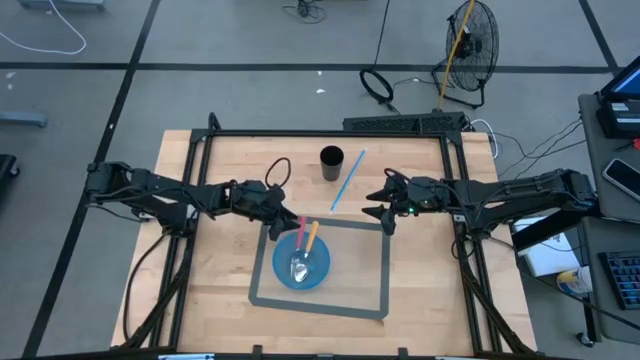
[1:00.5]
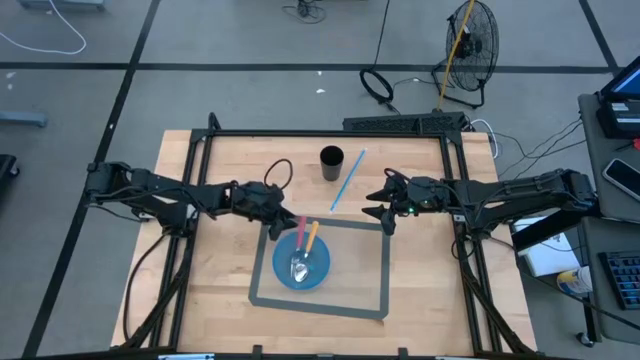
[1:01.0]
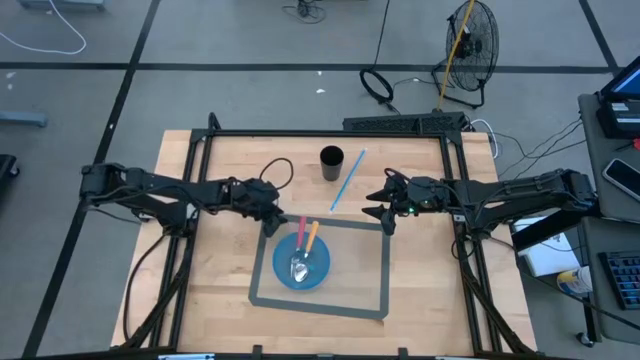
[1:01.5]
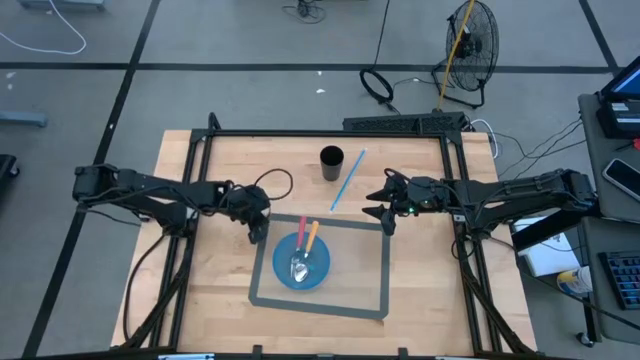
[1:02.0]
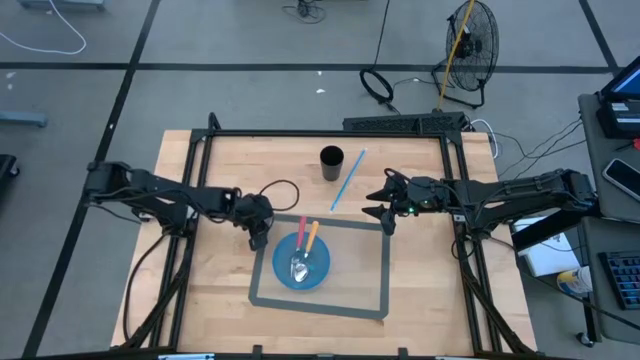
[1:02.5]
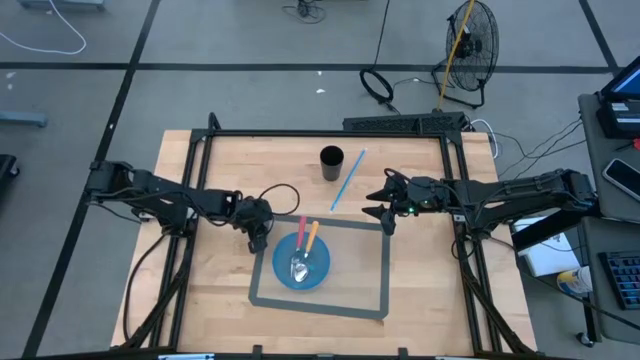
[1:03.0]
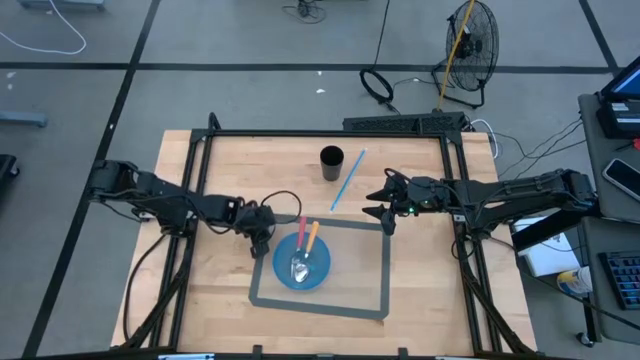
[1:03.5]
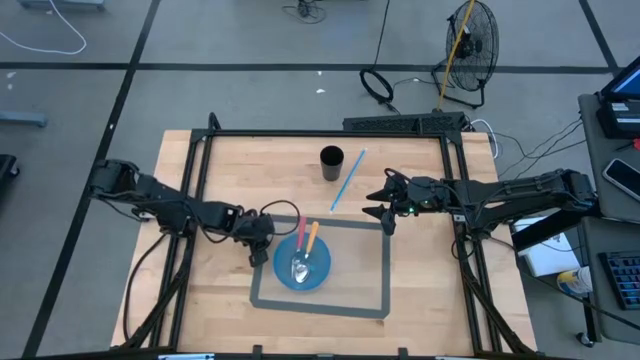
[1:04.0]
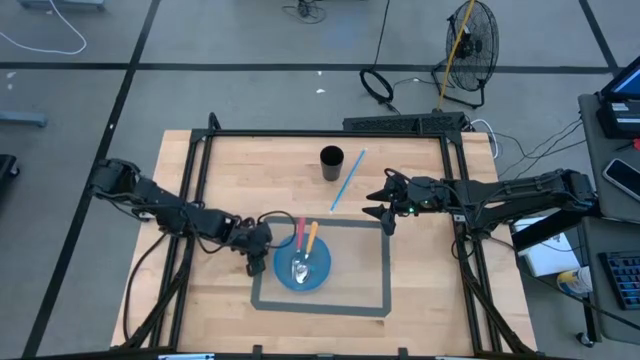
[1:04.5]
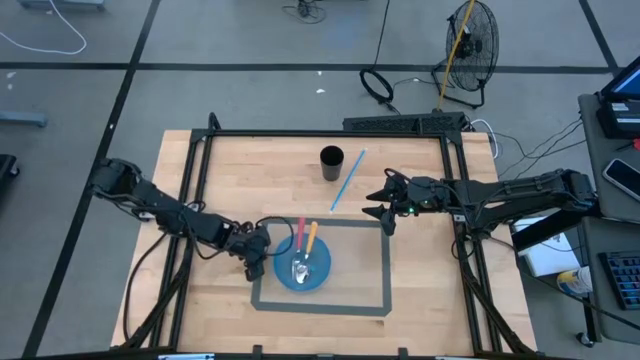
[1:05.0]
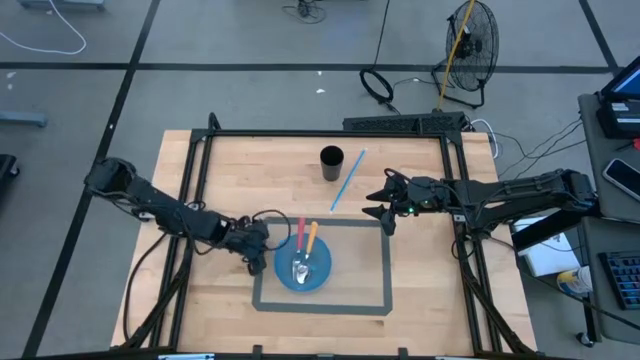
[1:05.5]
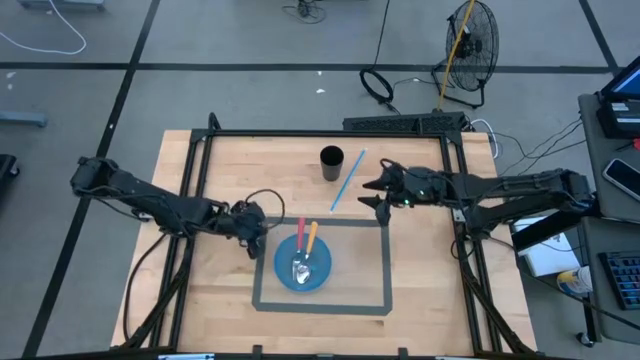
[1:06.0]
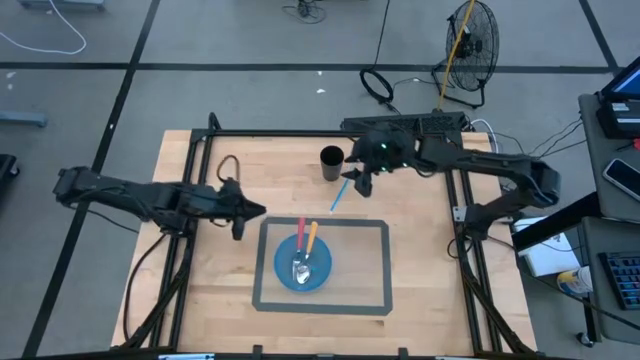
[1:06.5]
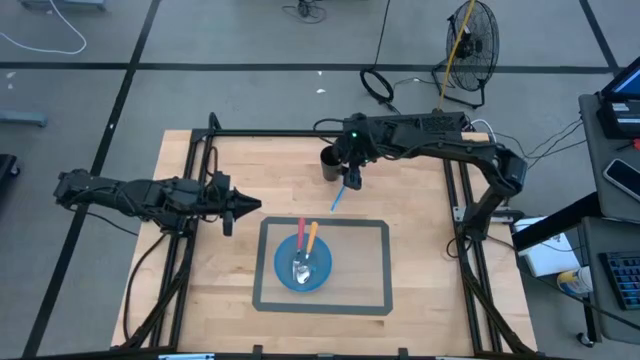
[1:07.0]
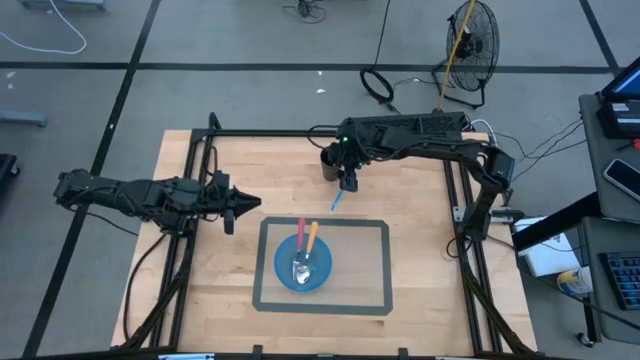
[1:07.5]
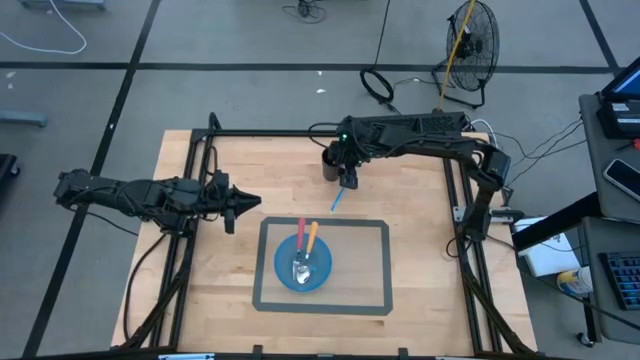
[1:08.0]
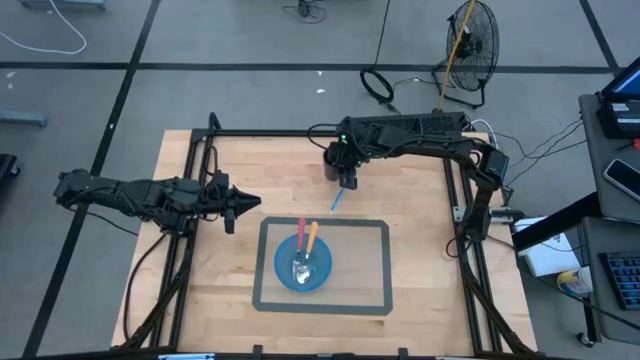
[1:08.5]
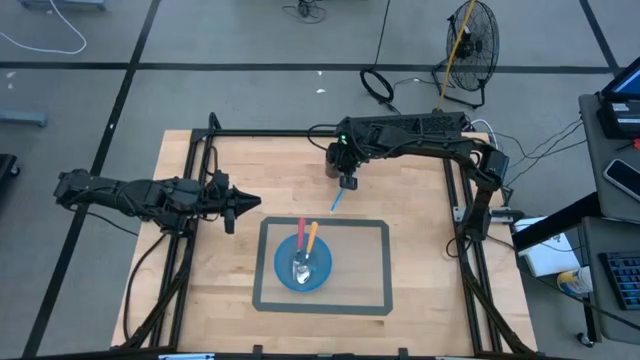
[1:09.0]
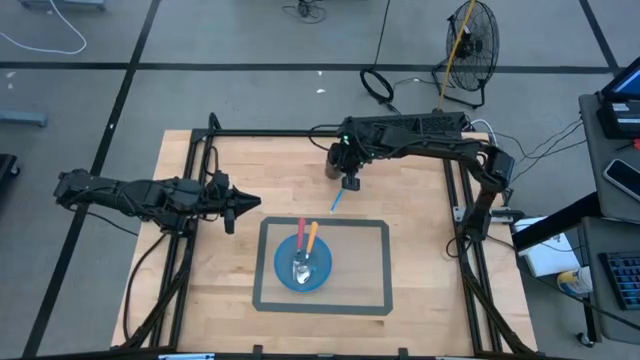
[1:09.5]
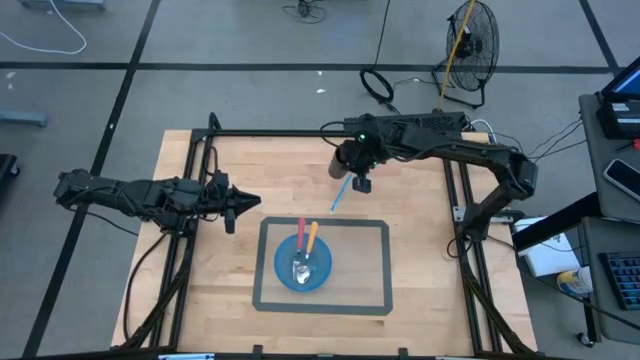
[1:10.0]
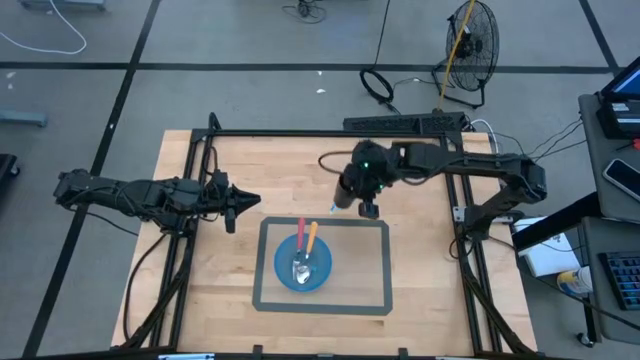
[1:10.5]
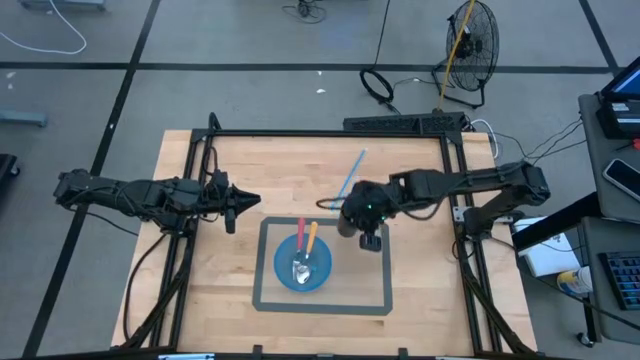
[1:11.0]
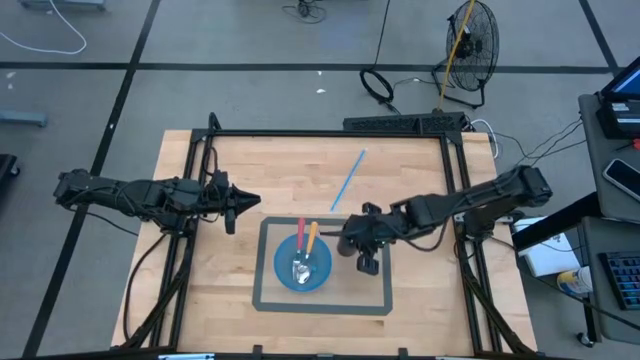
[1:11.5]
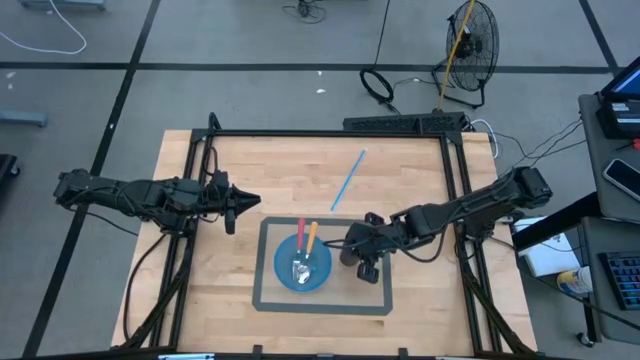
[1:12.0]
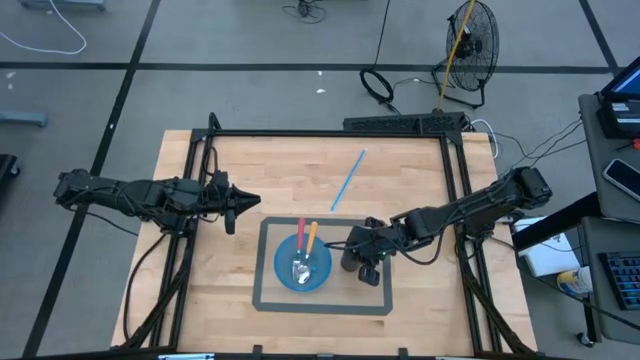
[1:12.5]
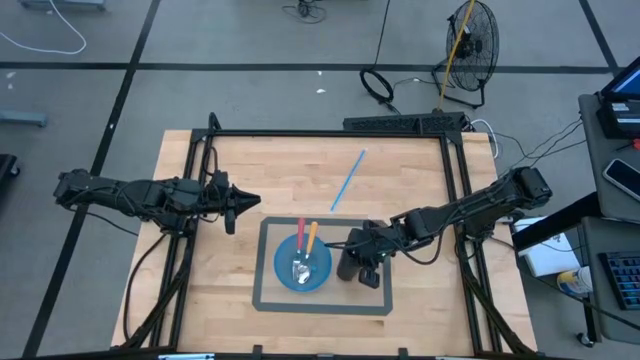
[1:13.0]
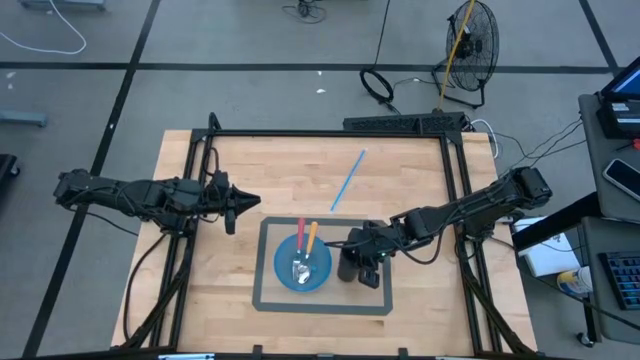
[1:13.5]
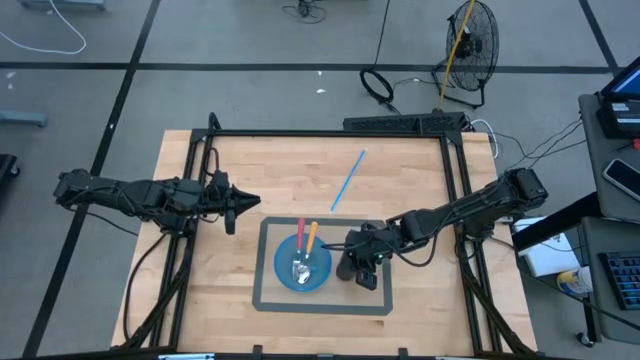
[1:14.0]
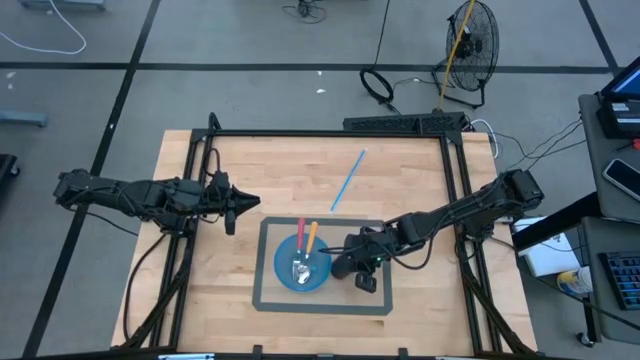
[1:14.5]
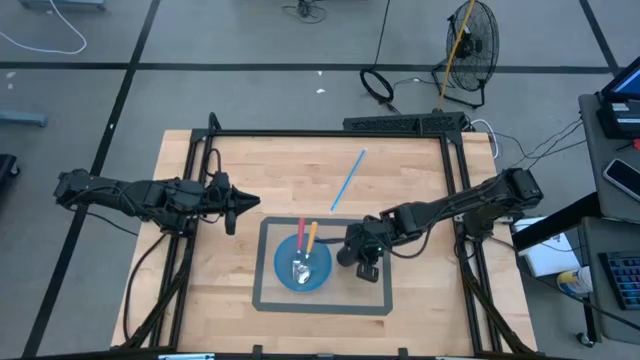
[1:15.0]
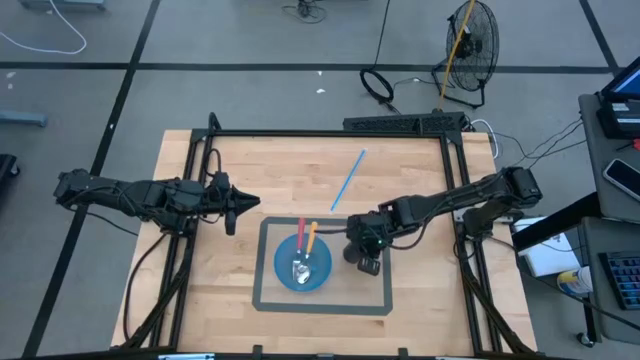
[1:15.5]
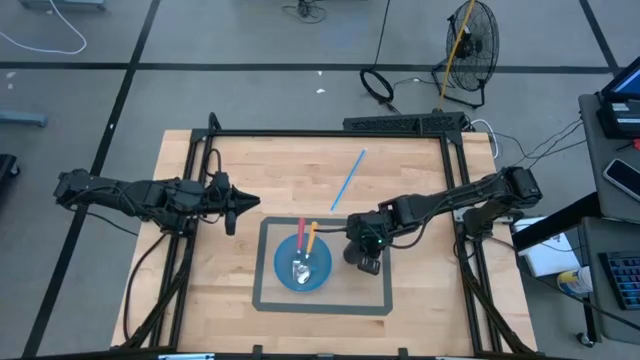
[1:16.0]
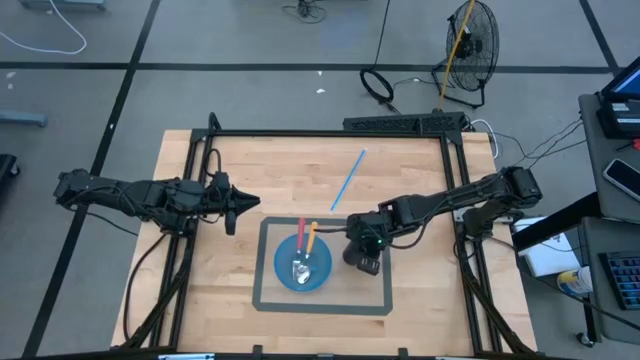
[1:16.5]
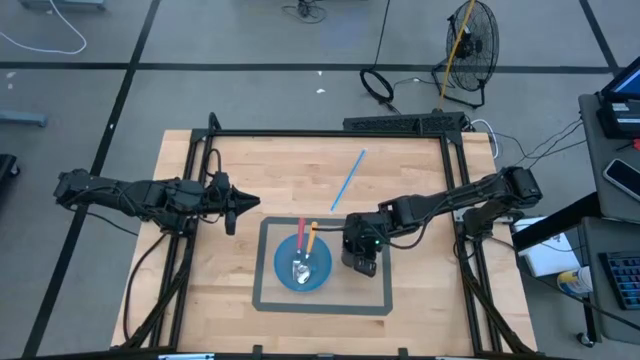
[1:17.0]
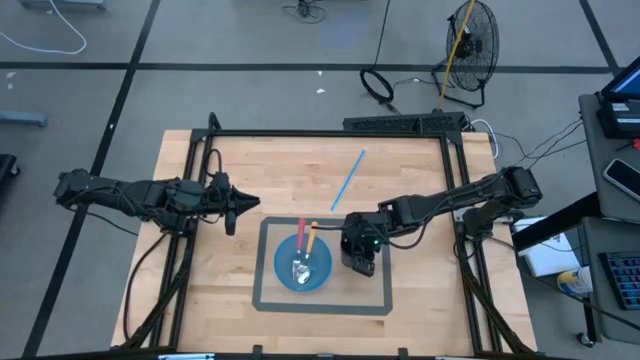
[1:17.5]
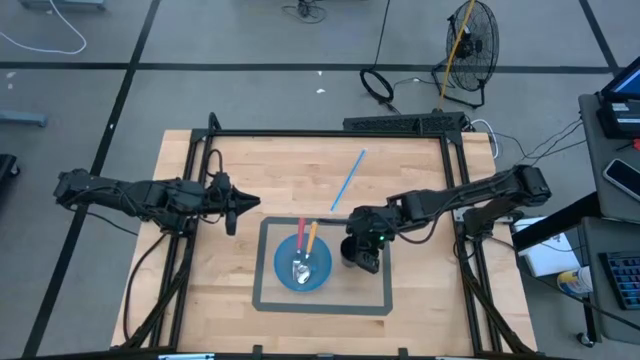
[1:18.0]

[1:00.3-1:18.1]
Task: Pick & Place Utensil
Put the black cup on the transparent mat to the right of the blue bowl

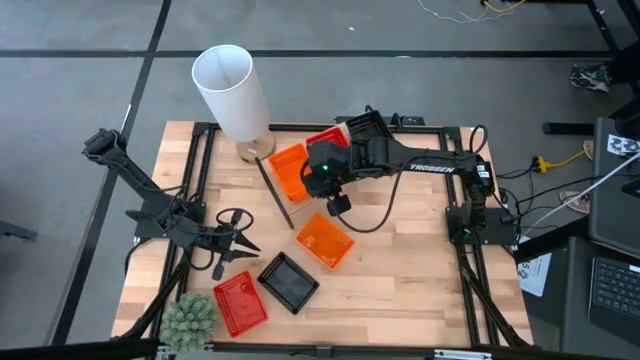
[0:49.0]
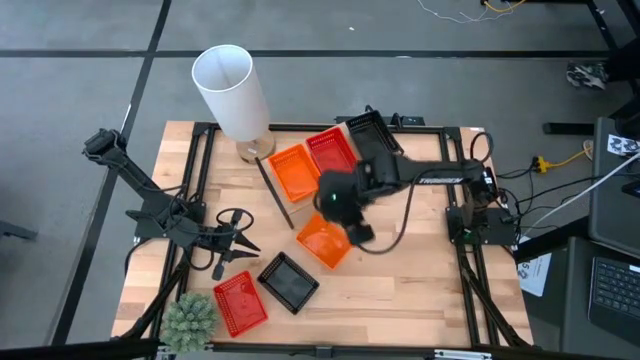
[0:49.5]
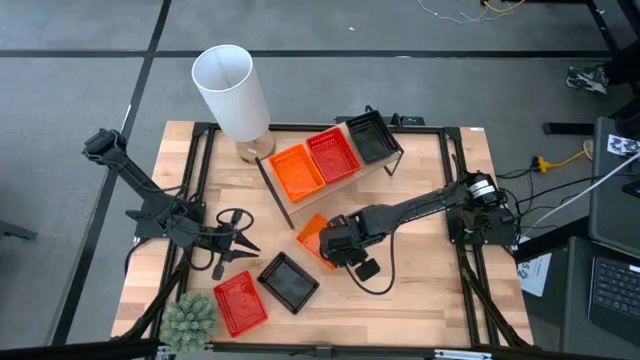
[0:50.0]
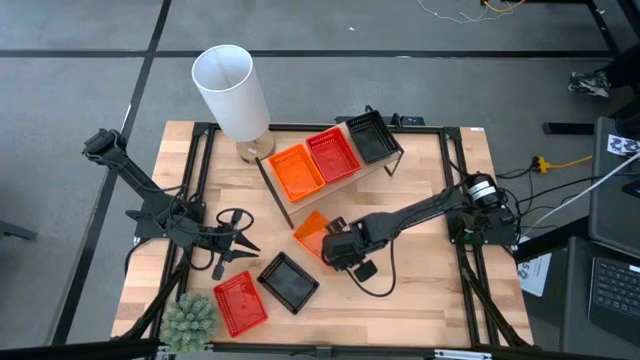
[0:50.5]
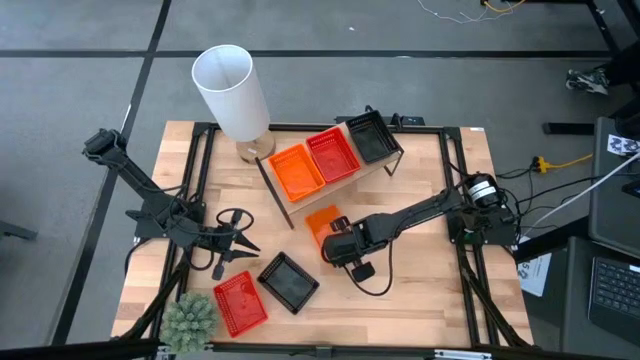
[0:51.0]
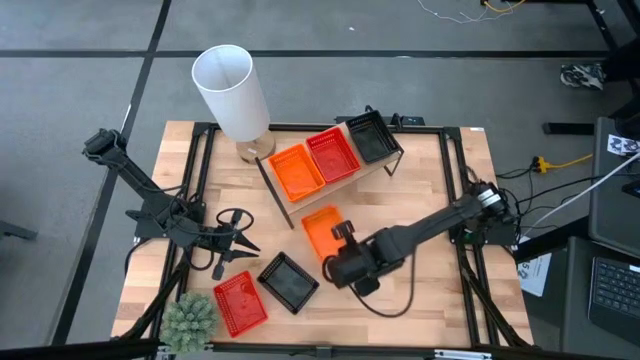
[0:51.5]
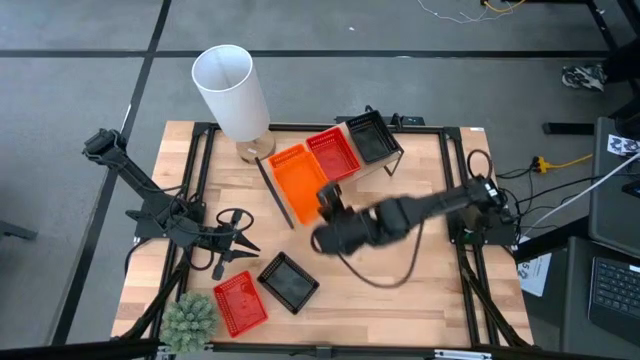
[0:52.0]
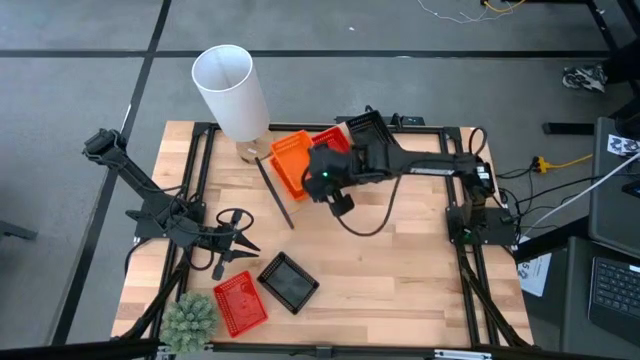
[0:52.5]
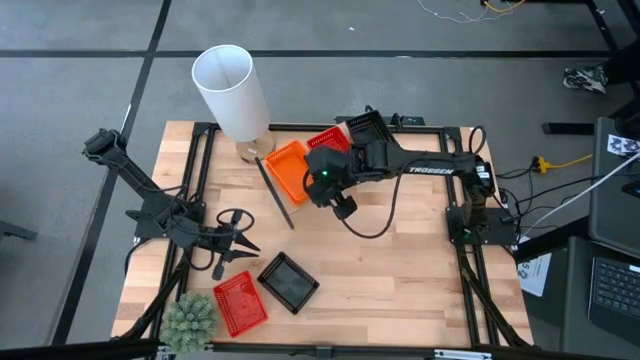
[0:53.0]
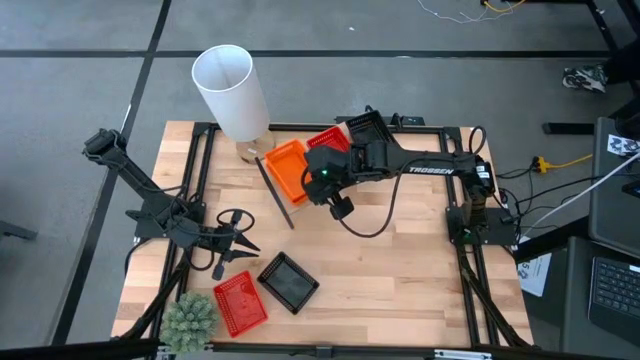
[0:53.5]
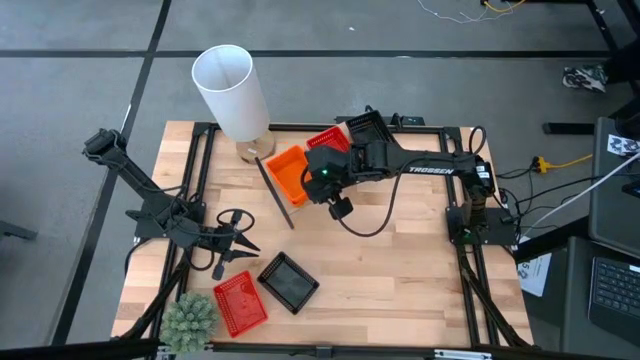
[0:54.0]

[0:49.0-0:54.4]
Task: Stack baskets on shelf by color
Stack the orange basket on top of the other stacked orange baskets on the shelf
